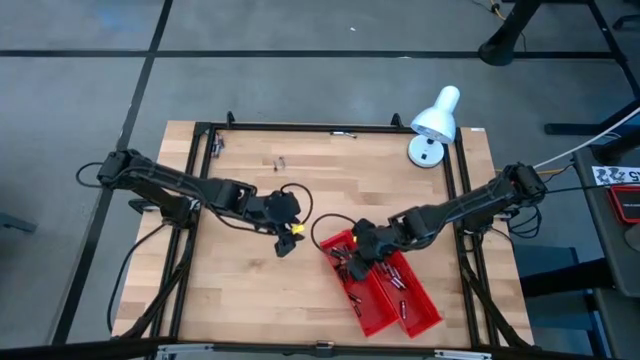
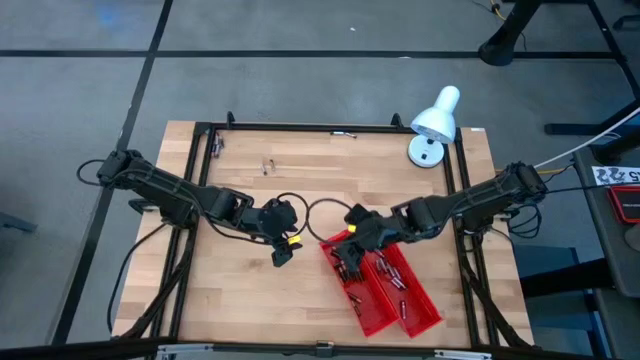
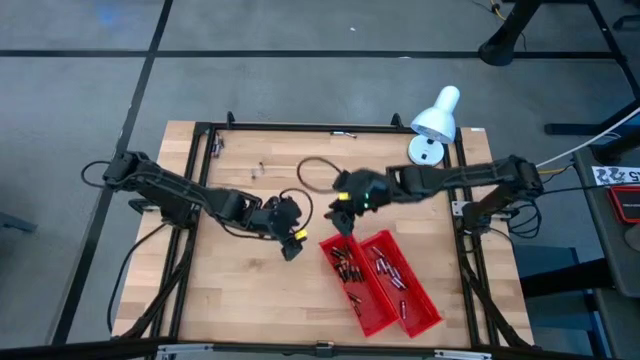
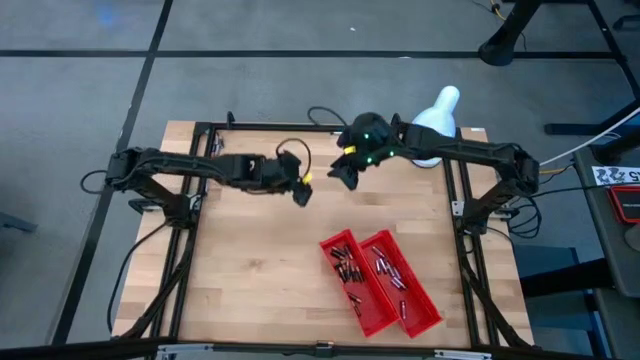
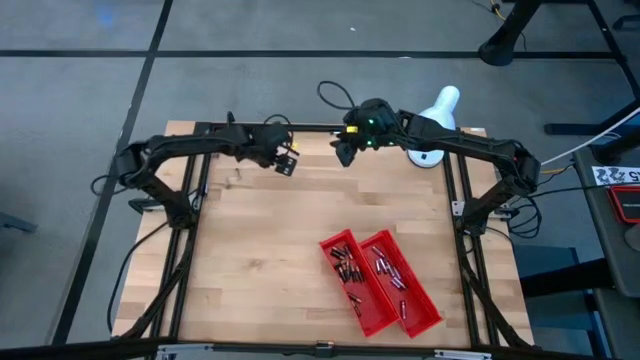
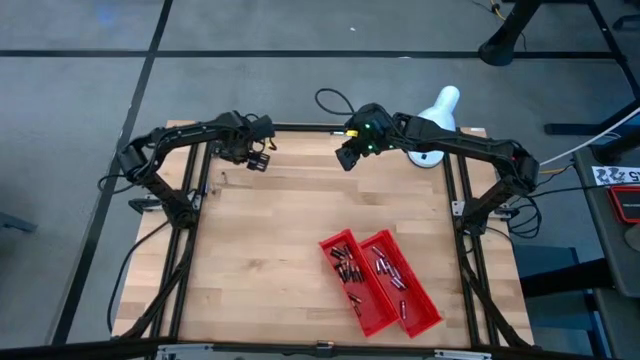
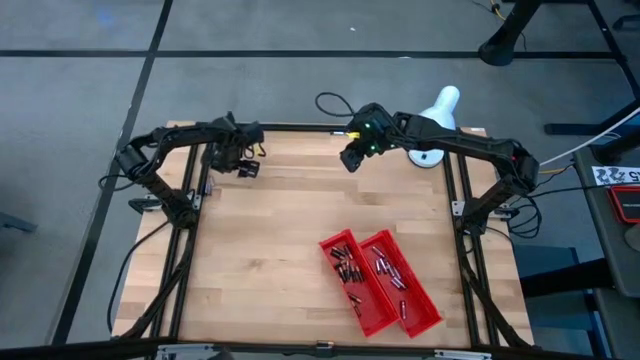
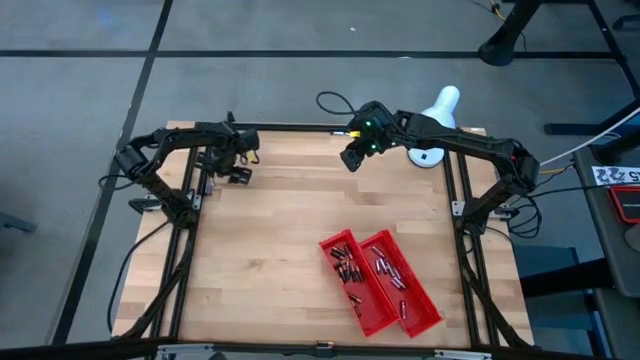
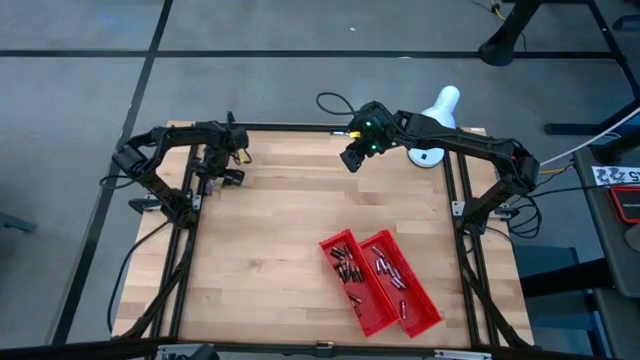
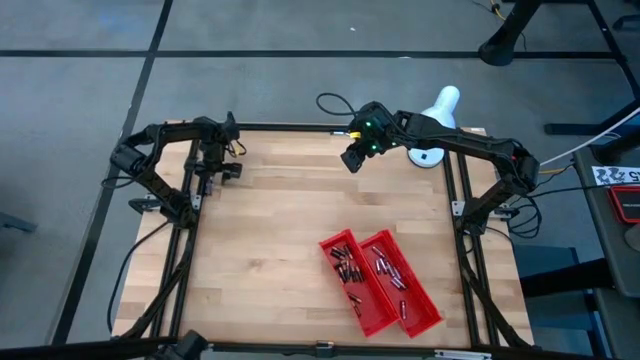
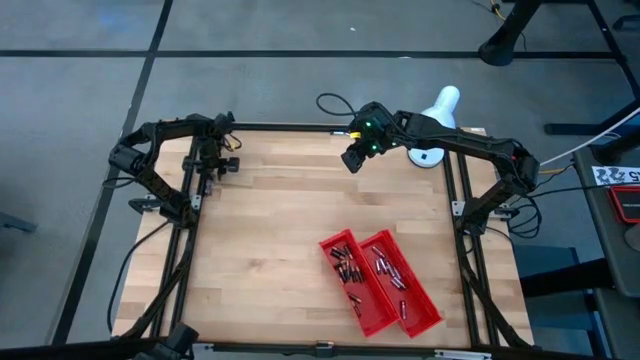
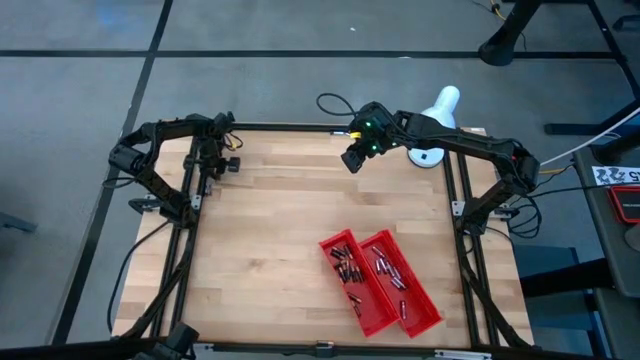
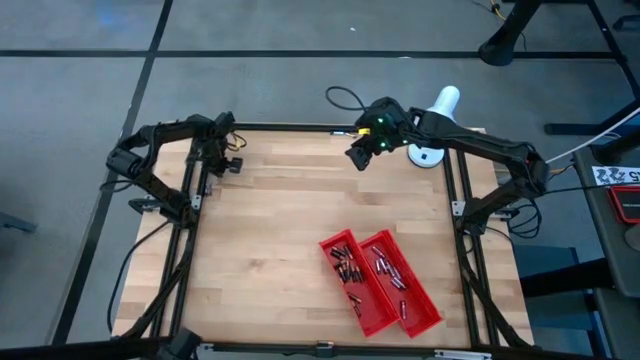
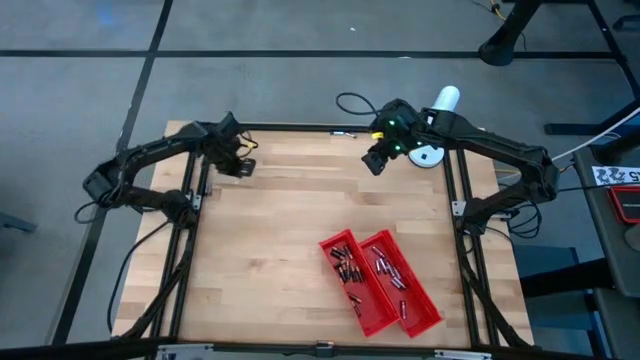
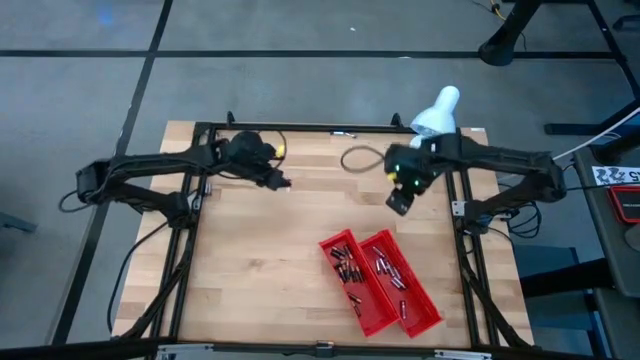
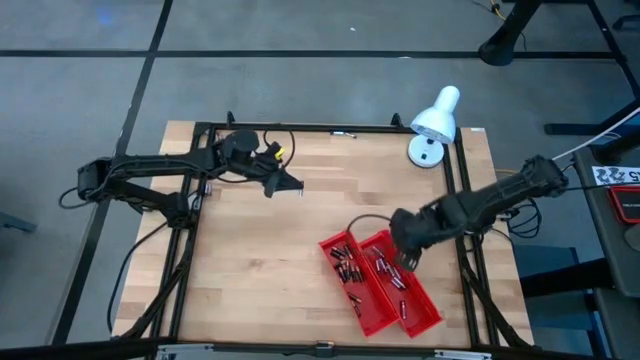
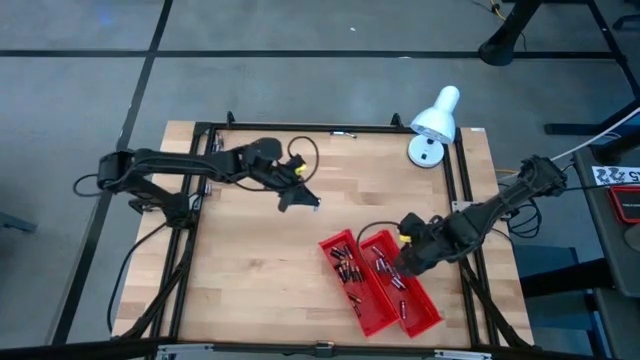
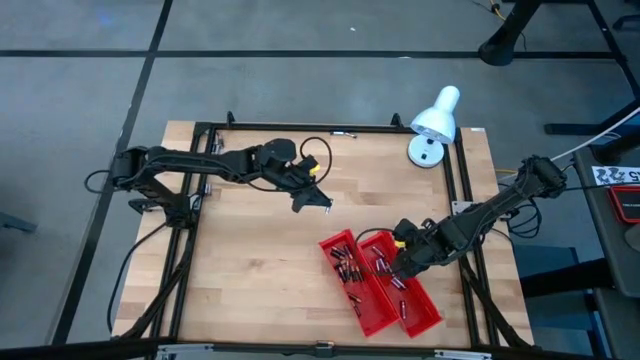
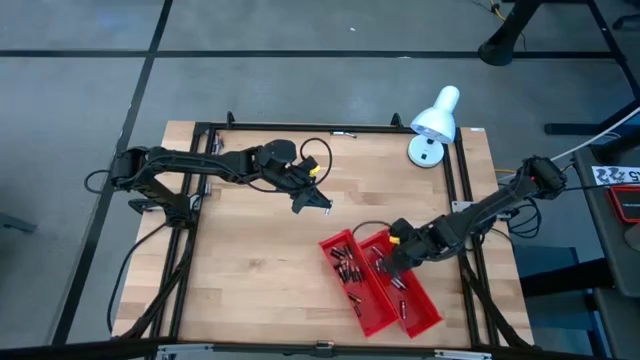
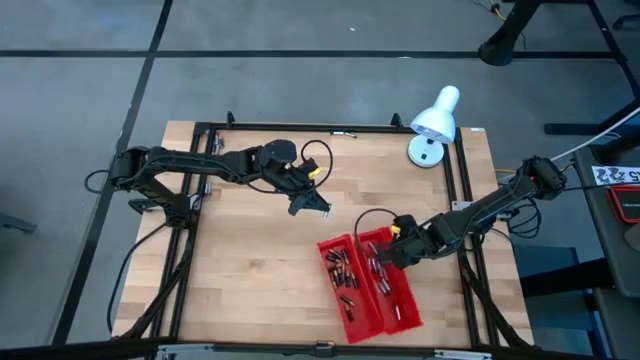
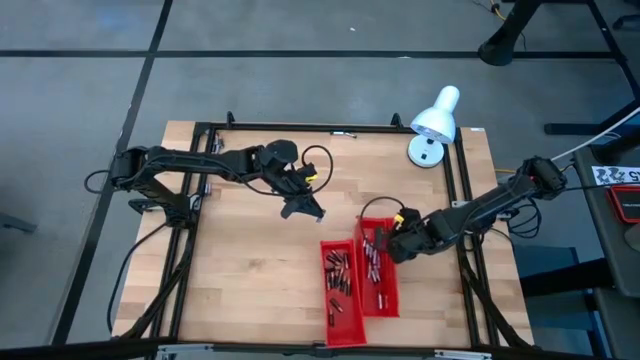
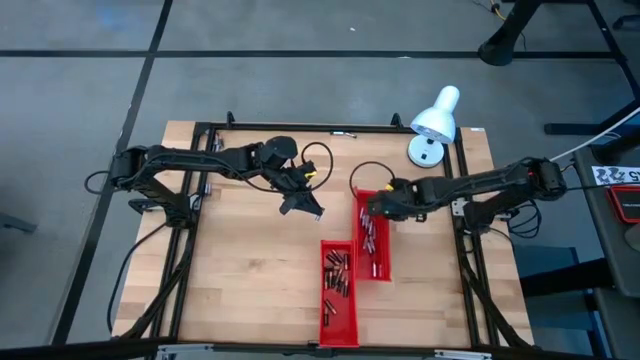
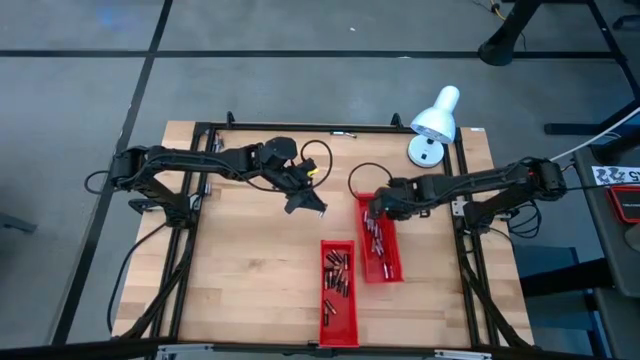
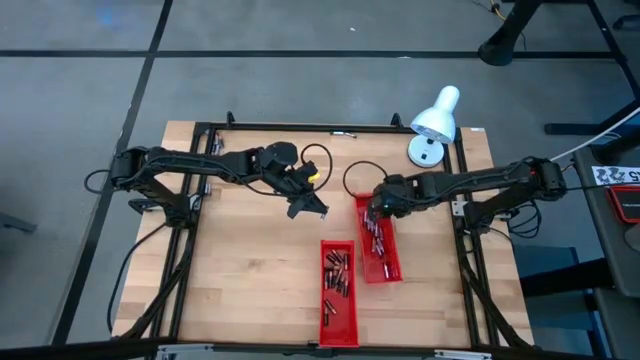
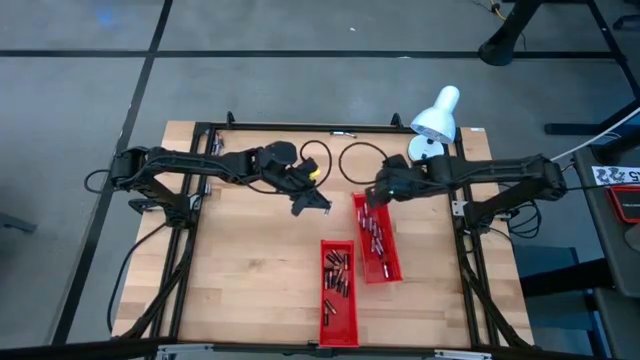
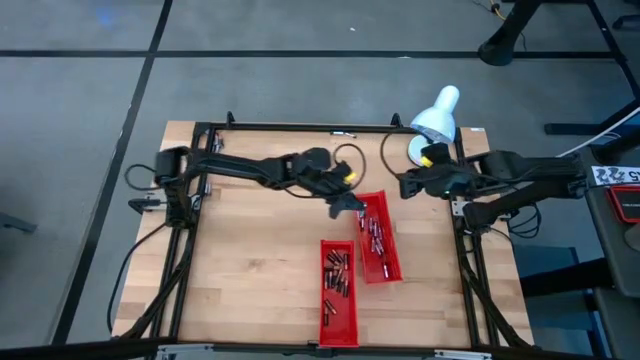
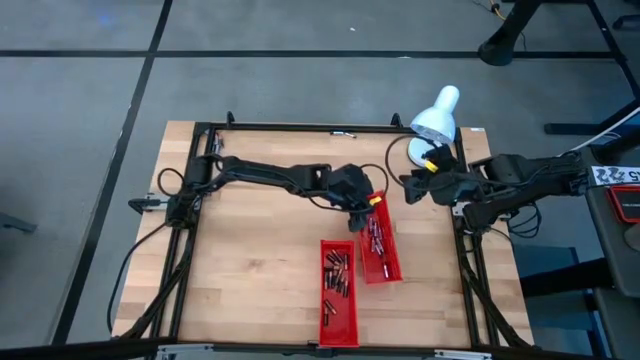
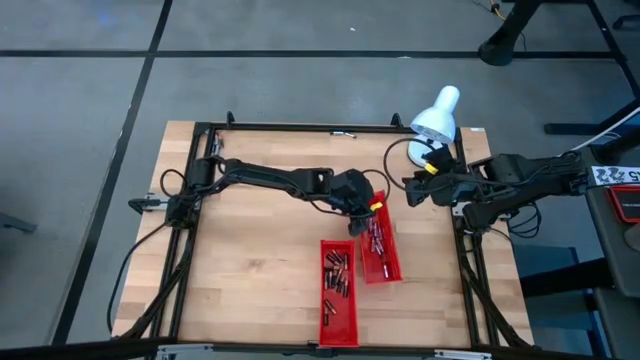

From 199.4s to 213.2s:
Task: Sort batteries
Put the silver battery into the right red bin

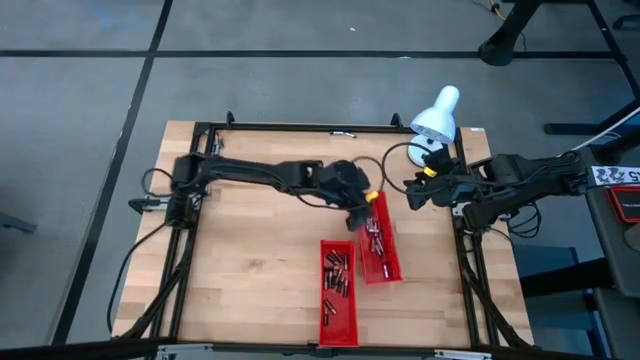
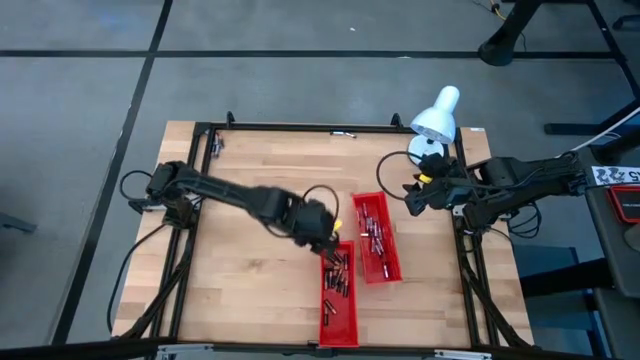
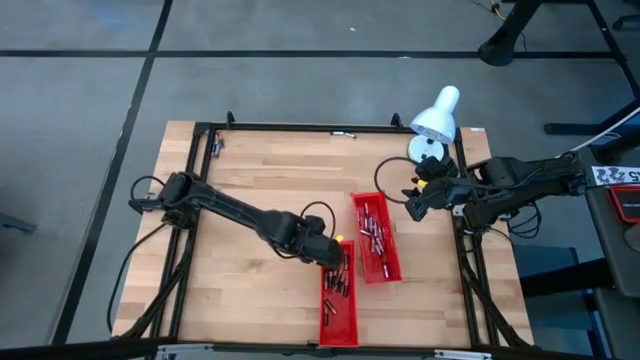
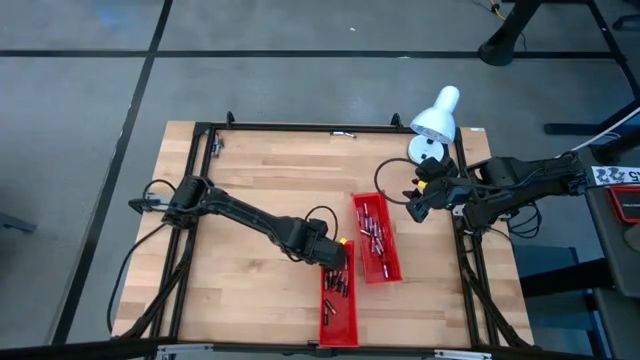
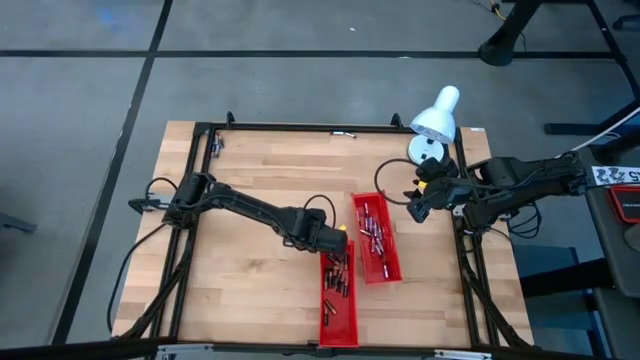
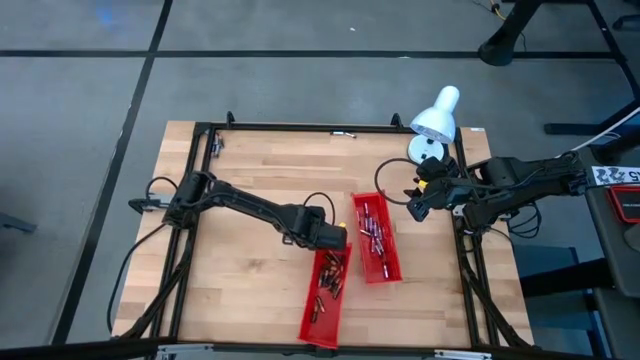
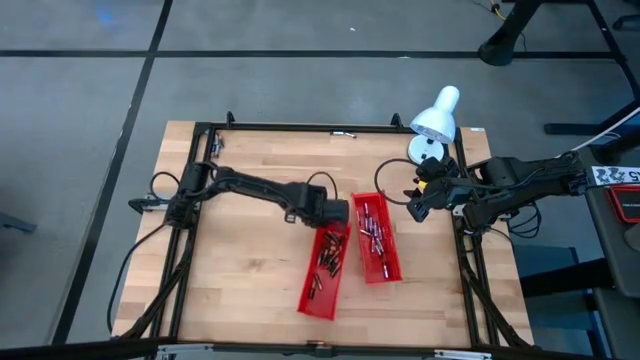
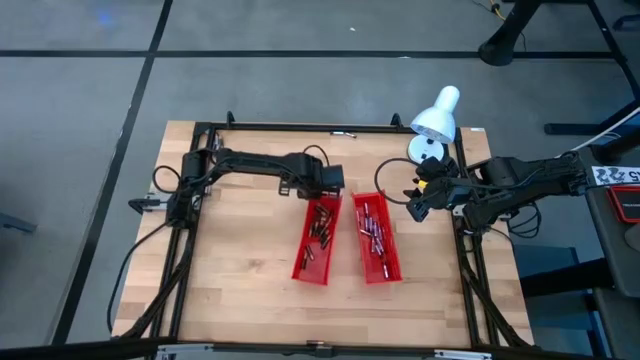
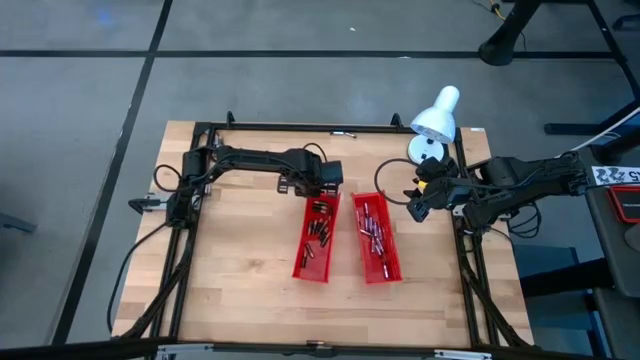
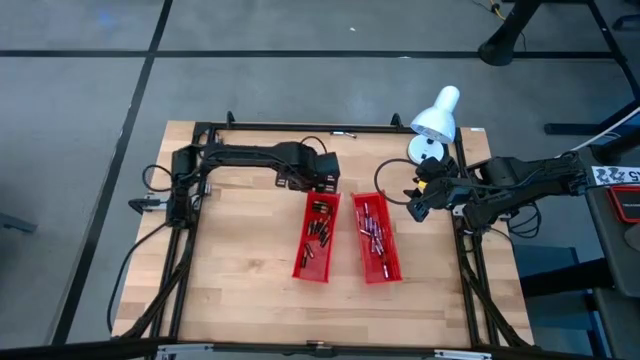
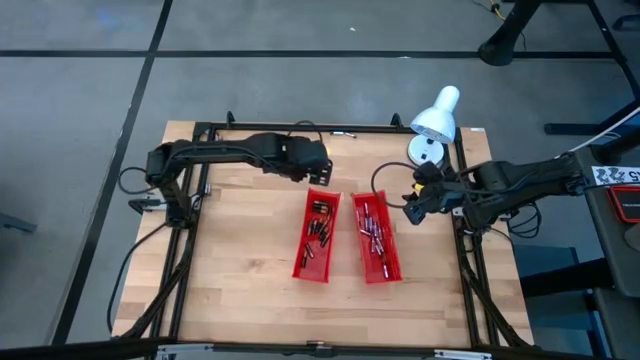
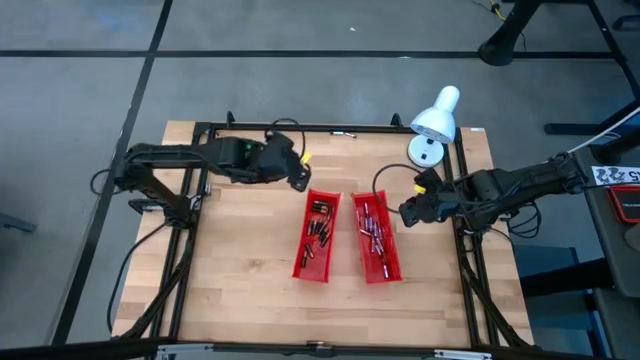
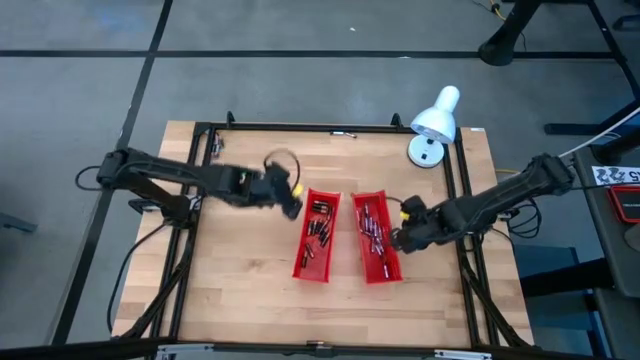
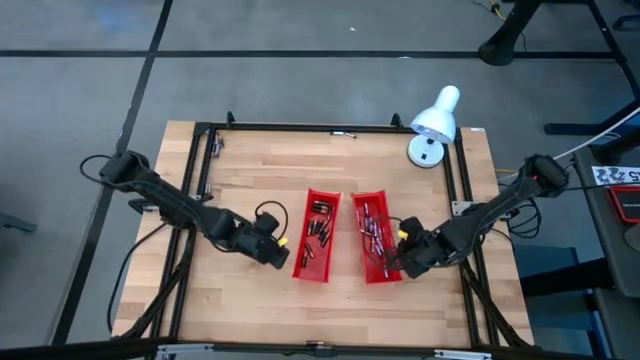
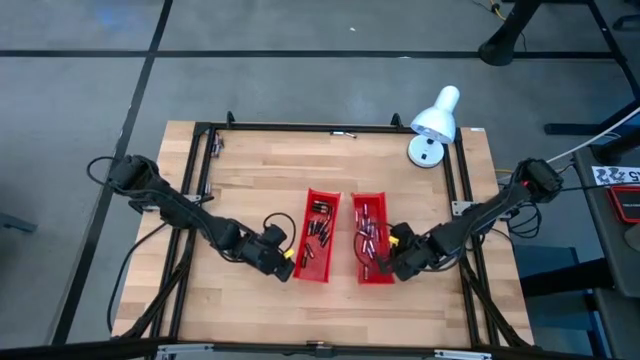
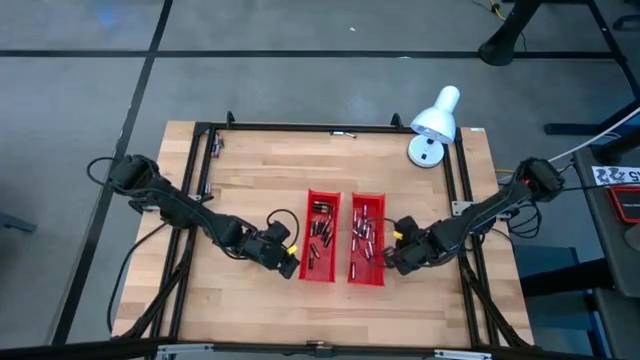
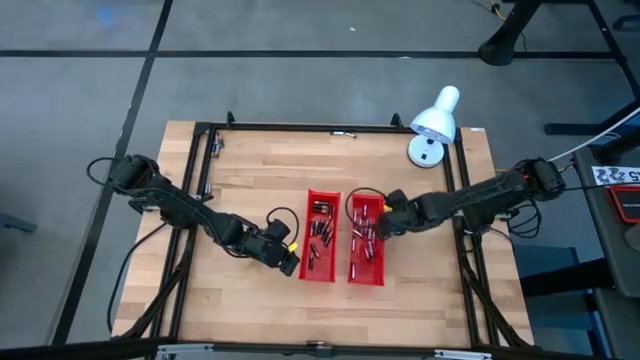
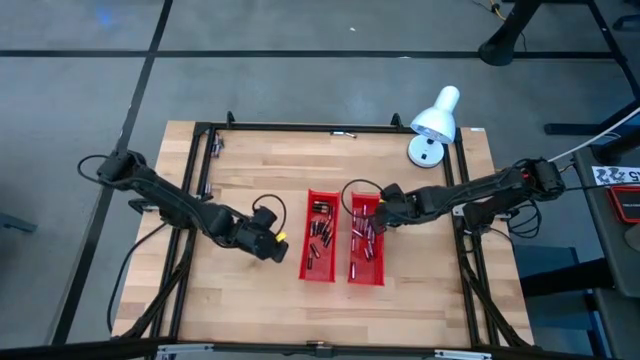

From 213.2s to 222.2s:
Adjust the red bins
